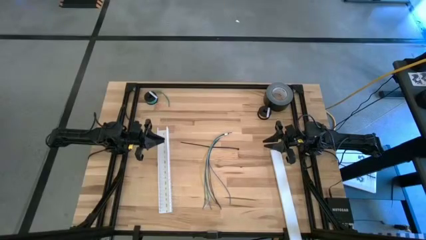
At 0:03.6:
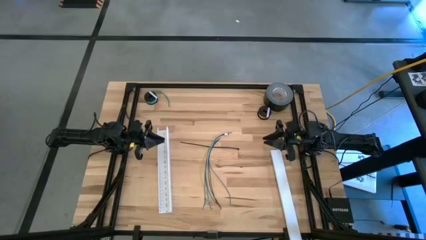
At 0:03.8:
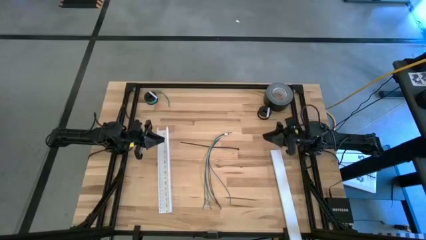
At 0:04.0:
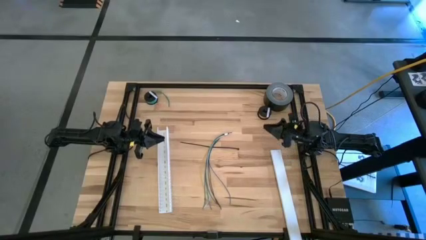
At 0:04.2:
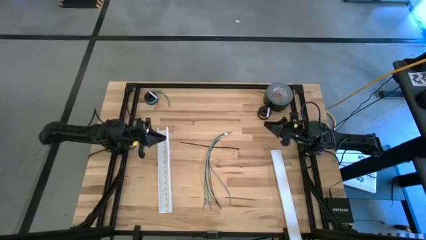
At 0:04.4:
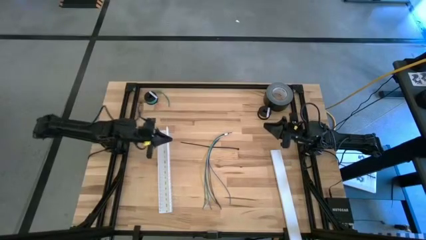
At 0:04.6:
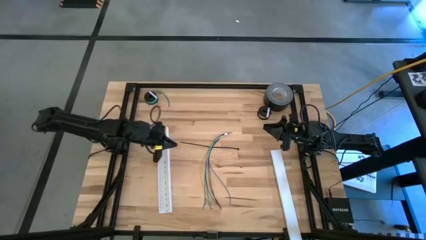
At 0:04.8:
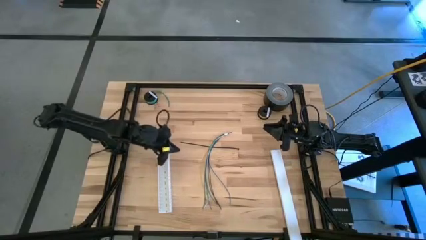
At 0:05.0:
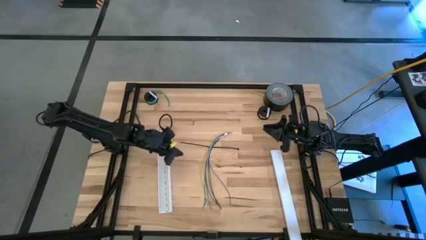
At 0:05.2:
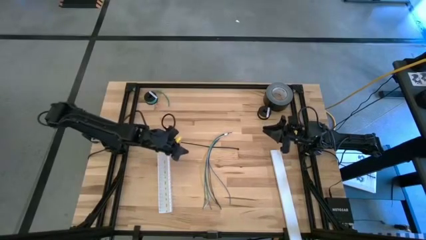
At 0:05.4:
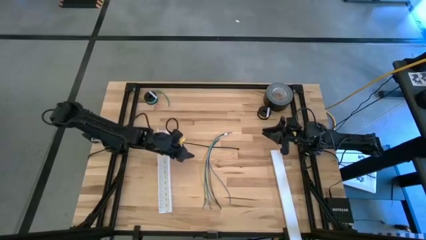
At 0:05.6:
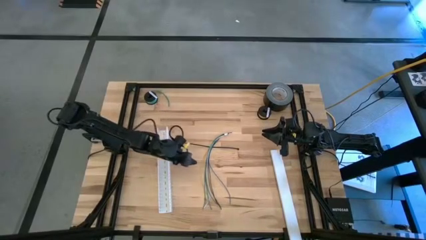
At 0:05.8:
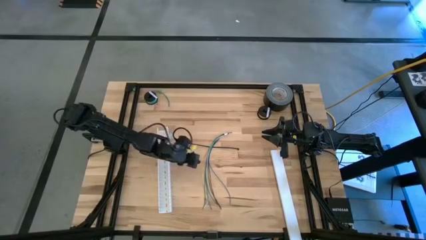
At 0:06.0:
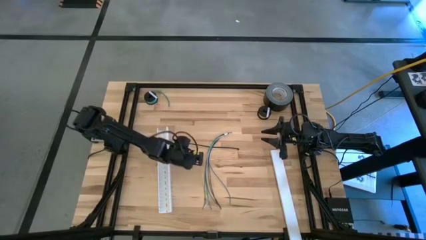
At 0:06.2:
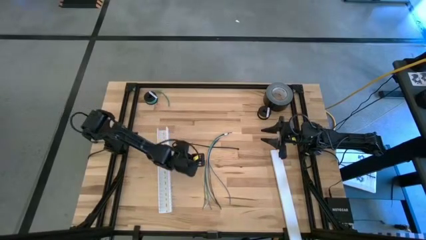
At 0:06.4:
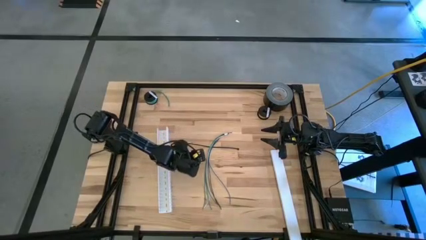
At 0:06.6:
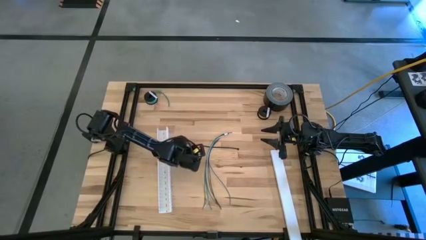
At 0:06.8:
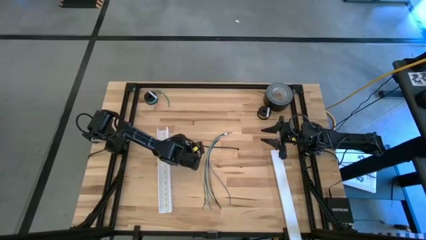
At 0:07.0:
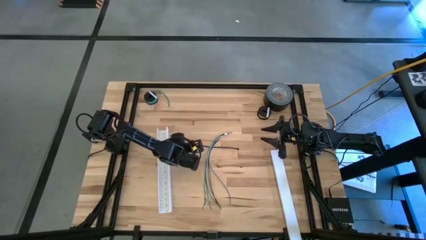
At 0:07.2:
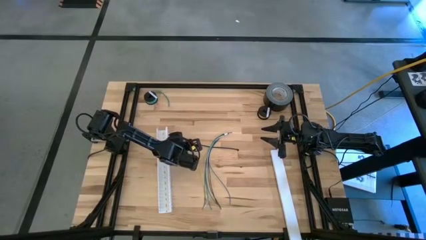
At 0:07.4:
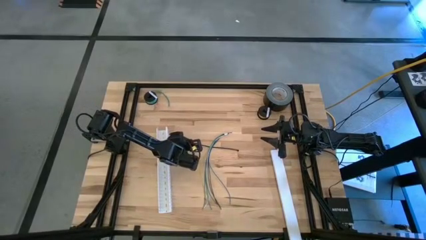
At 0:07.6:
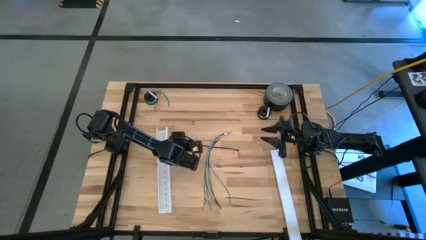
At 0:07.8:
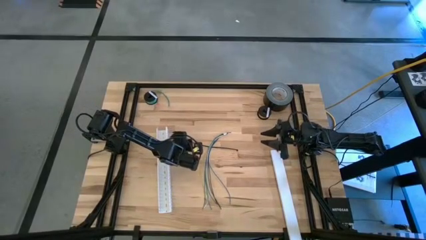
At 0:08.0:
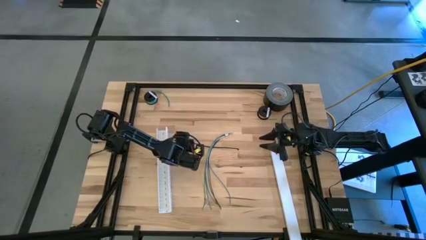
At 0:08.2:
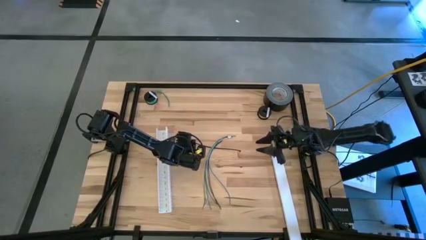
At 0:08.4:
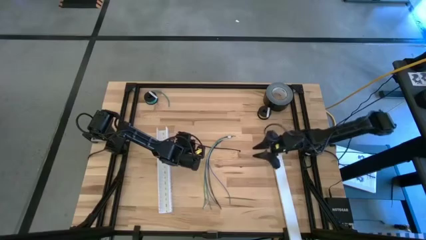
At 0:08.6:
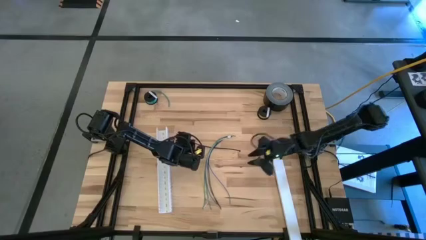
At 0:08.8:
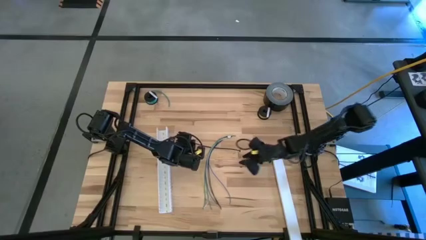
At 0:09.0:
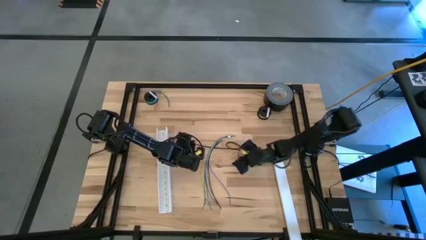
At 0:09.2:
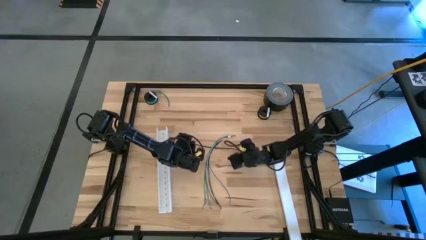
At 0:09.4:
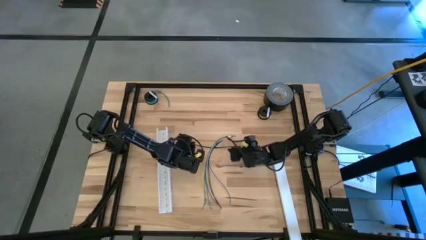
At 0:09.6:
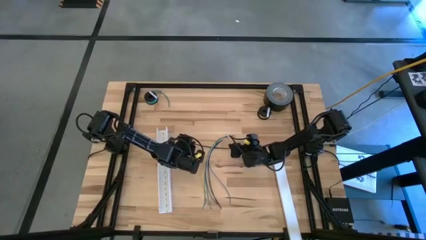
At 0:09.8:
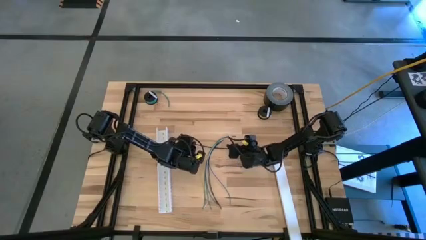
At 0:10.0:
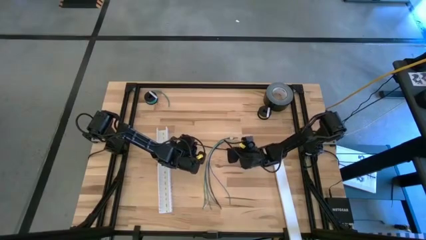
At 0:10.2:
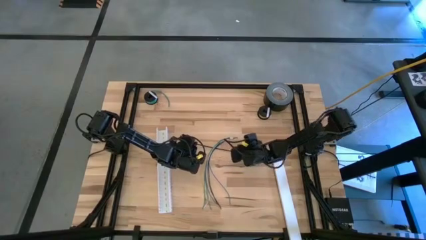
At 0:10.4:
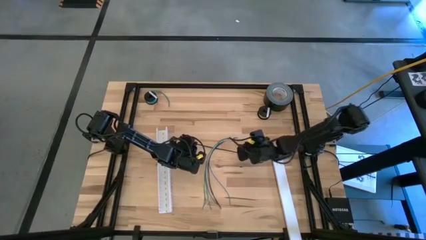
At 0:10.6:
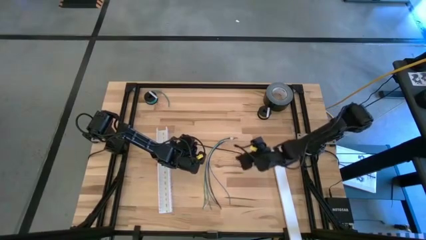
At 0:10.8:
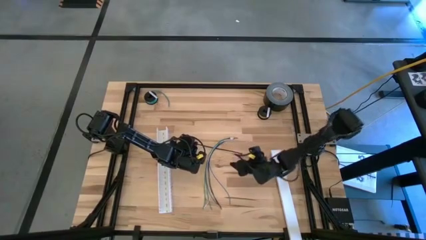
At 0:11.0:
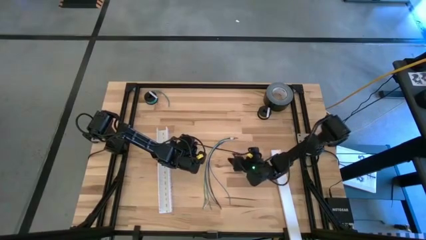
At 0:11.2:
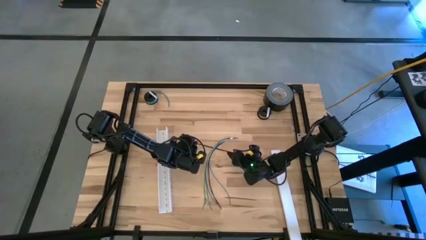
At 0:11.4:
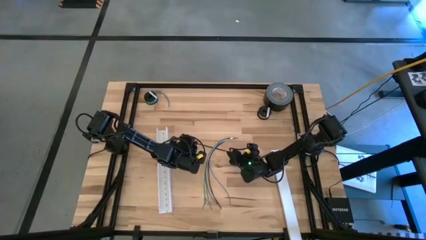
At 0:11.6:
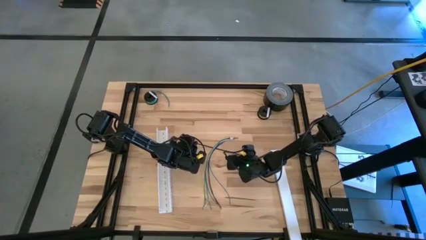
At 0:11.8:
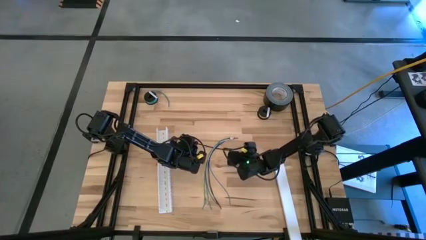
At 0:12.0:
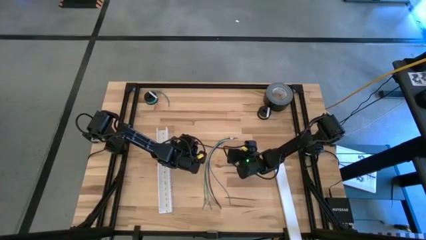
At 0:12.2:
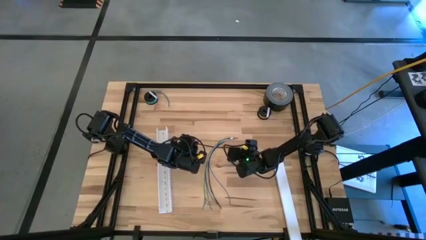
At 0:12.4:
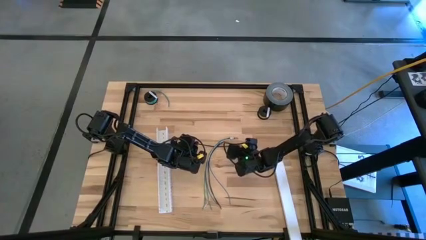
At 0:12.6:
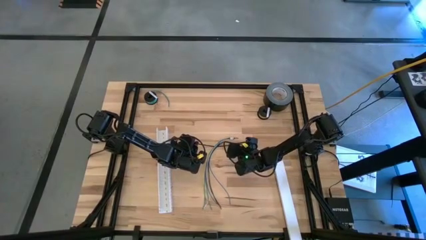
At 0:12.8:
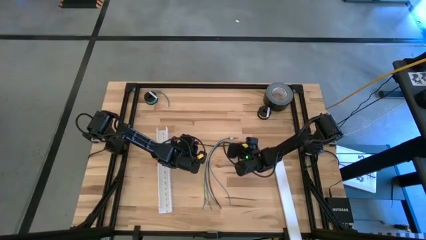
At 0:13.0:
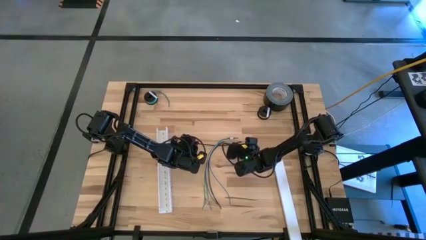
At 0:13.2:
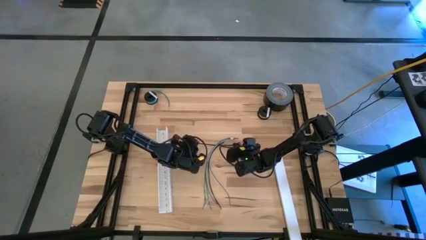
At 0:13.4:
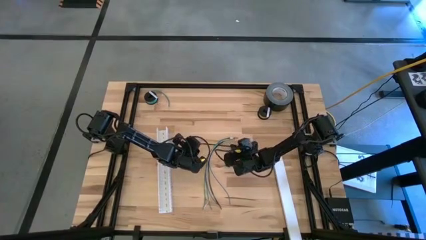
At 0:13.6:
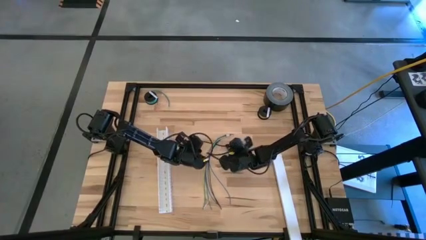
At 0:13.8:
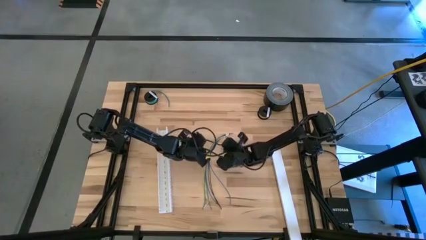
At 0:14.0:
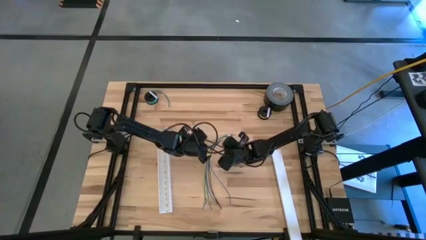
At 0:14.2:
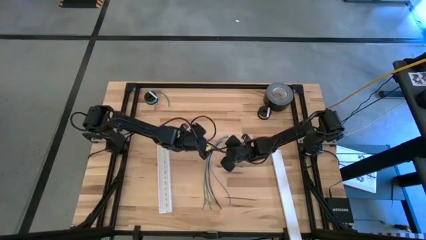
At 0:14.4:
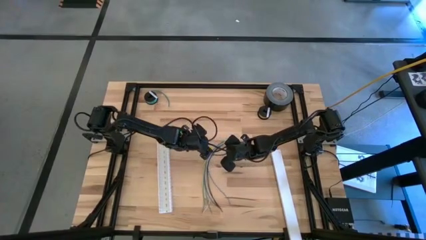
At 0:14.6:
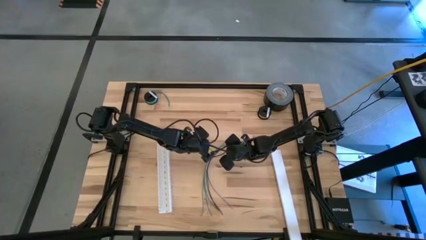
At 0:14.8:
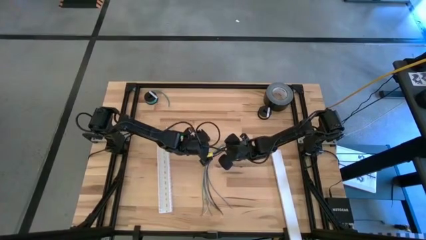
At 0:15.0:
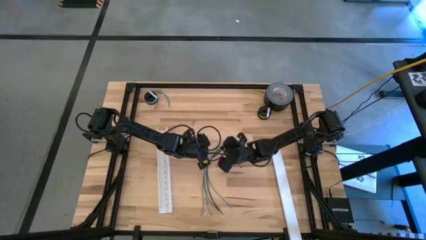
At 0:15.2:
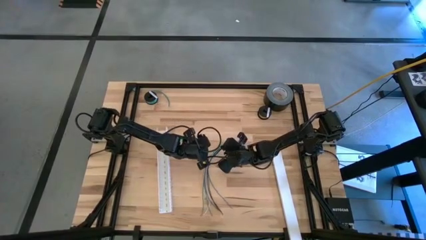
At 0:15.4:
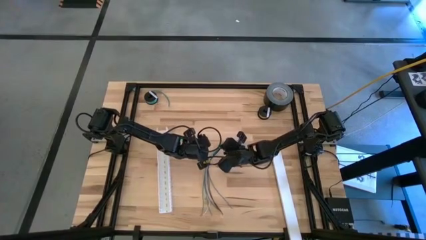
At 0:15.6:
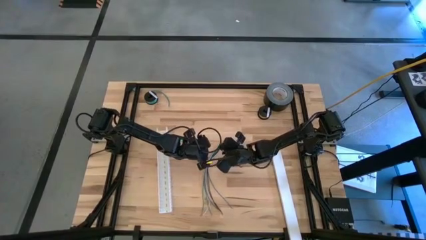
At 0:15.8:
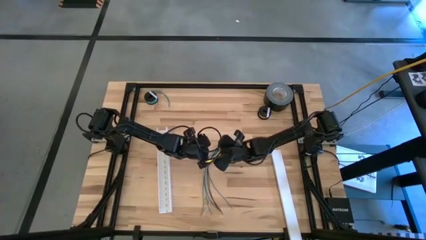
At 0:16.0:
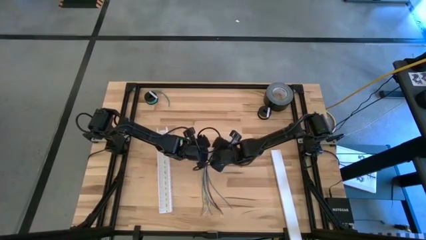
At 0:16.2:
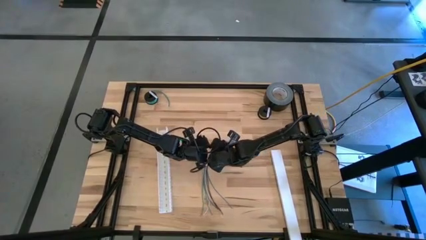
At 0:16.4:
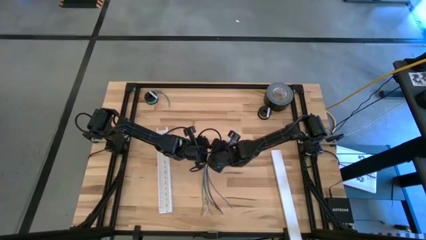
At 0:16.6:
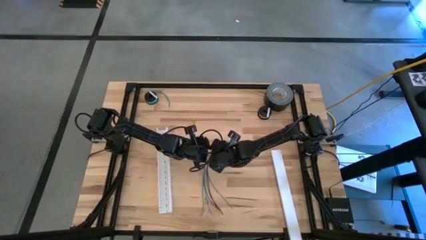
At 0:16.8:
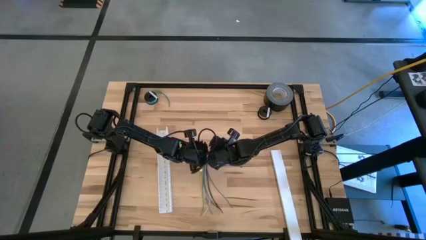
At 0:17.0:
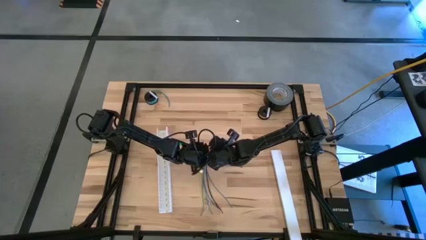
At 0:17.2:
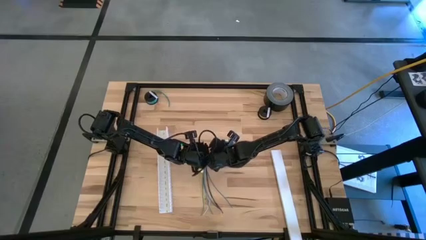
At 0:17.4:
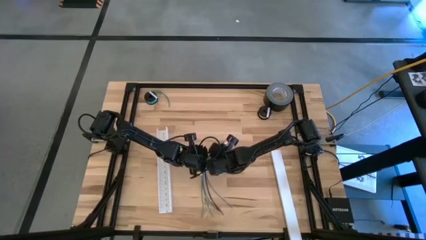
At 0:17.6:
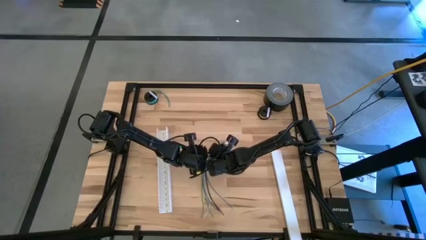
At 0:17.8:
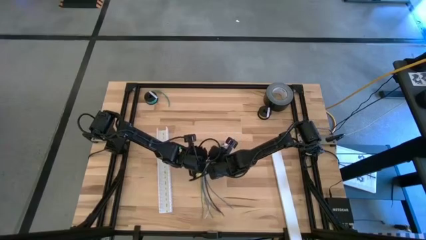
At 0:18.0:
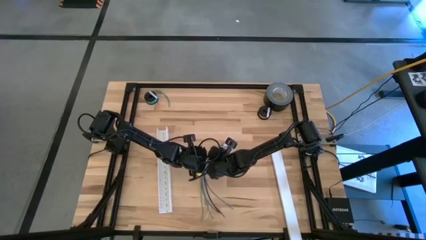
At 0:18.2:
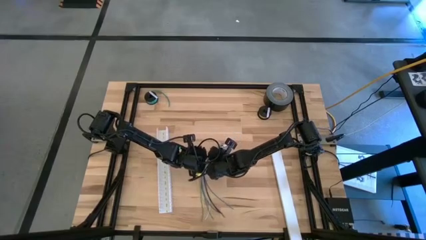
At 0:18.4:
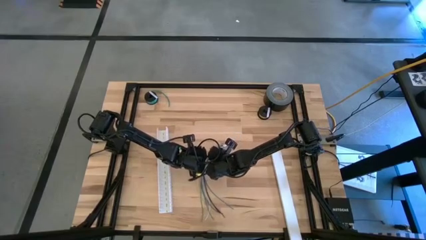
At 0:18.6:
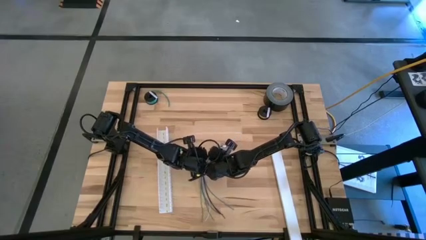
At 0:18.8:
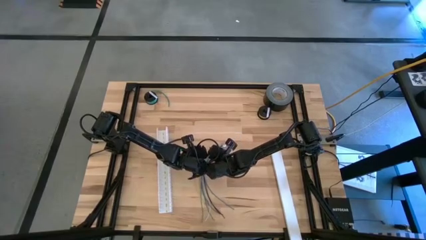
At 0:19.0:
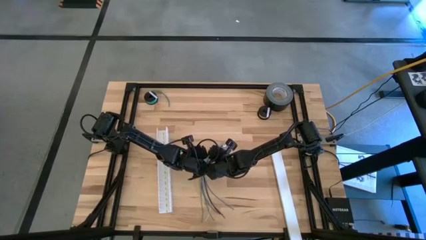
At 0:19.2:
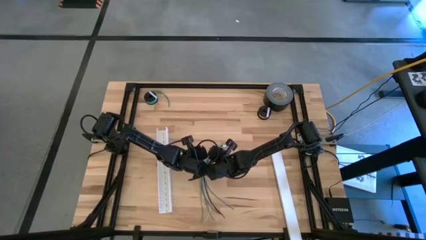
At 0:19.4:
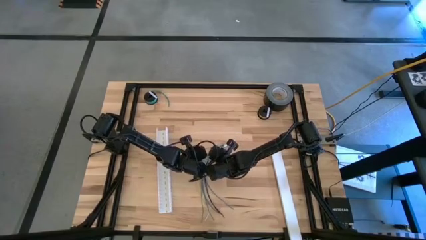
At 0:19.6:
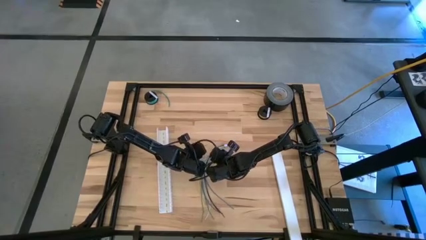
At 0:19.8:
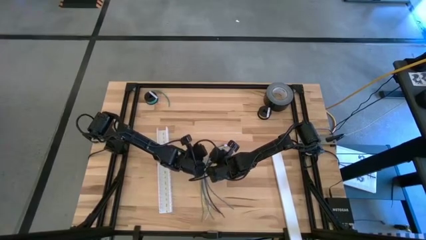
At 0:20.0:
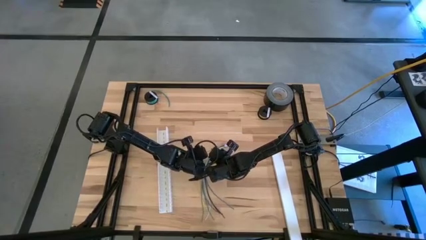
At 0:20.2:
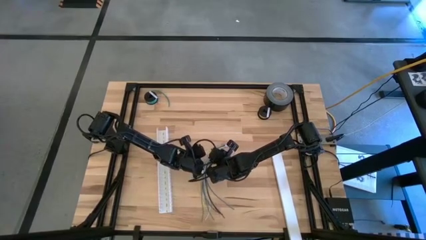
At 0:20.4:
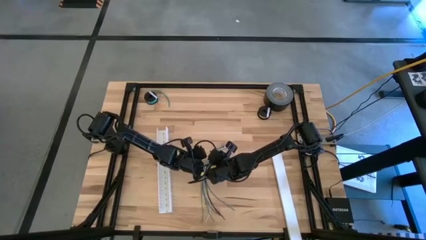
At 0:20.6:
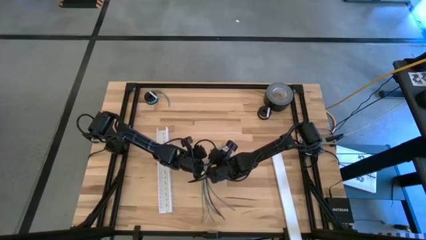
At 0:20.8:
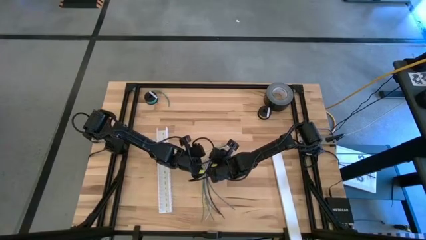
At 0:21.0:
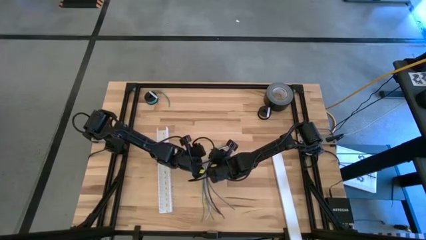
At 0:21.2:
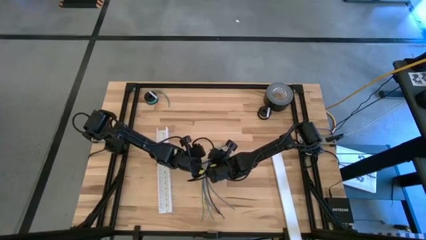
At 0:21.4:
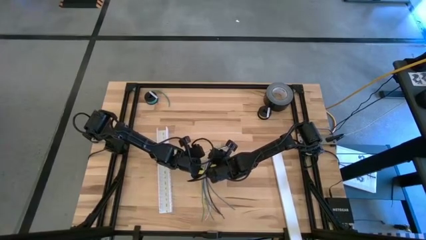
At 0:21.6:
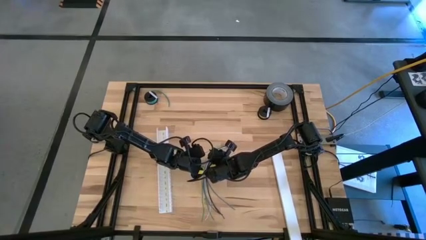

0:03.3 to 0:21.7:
Task: Ziptie cables
Wrap the colored cables with the black zip tie
